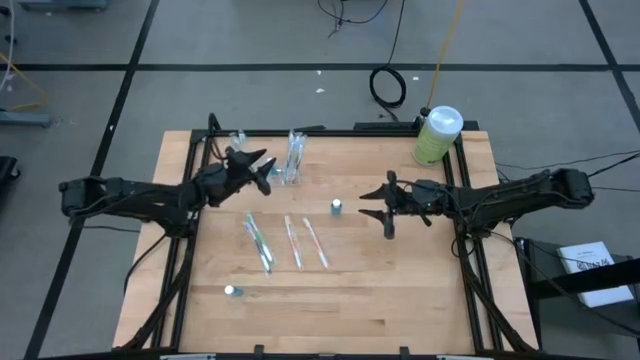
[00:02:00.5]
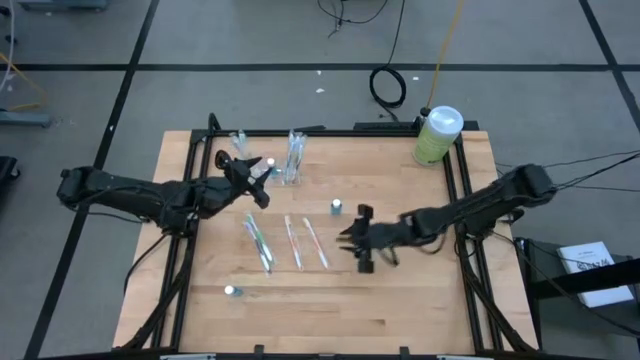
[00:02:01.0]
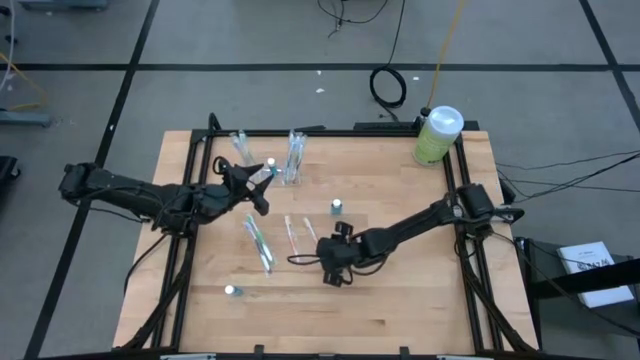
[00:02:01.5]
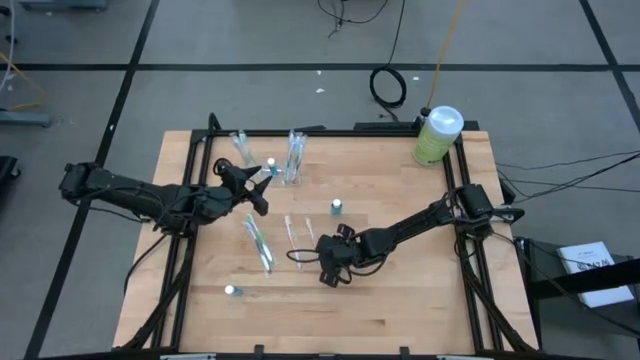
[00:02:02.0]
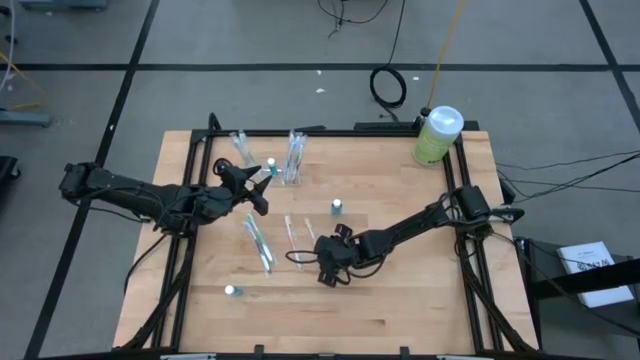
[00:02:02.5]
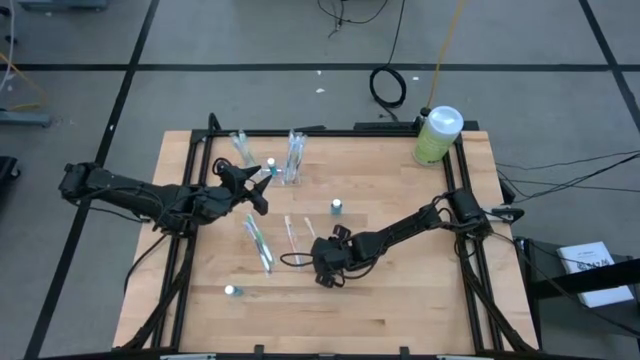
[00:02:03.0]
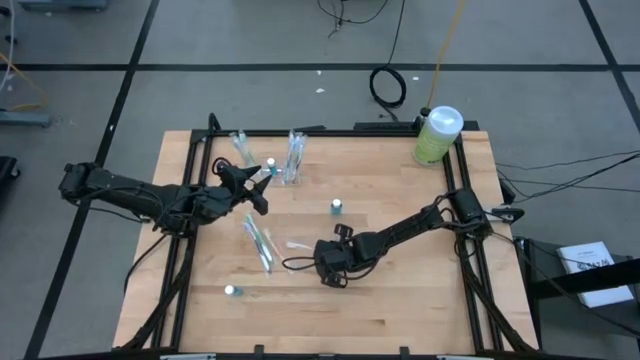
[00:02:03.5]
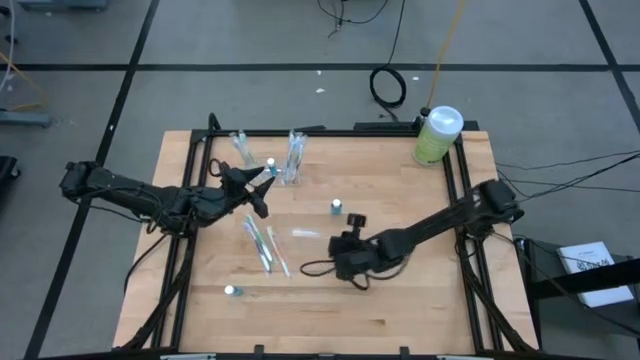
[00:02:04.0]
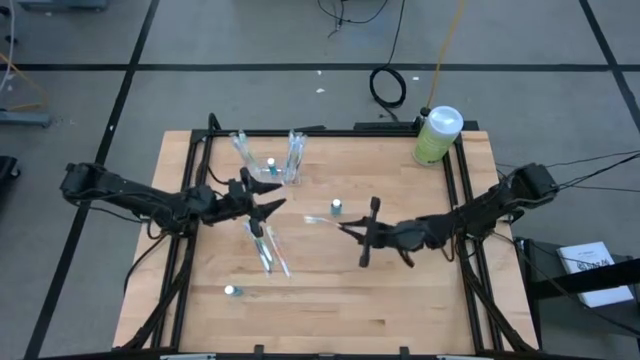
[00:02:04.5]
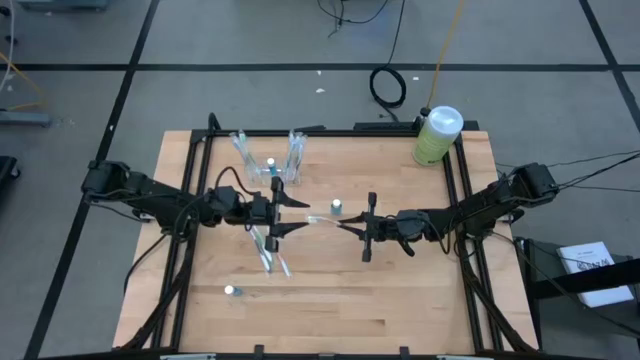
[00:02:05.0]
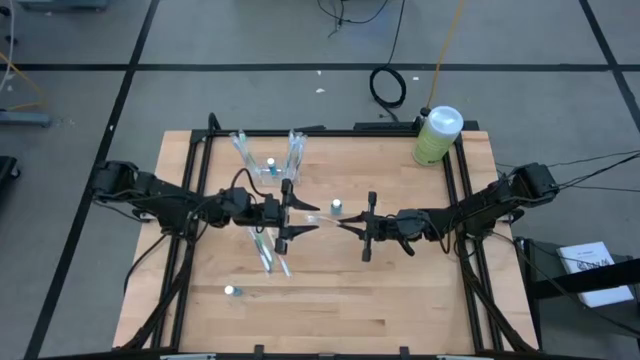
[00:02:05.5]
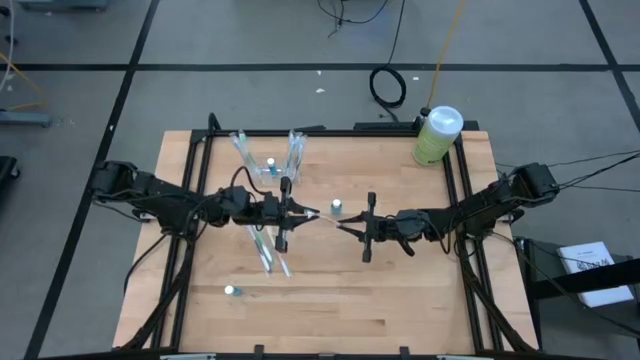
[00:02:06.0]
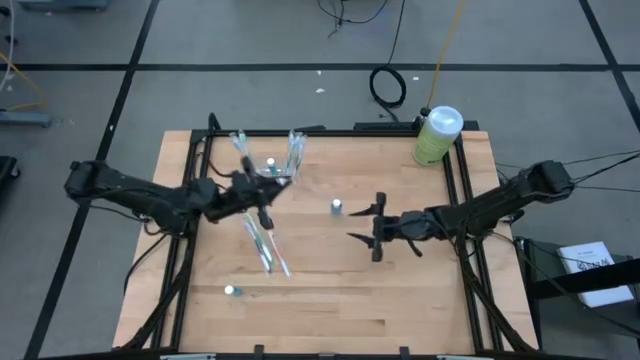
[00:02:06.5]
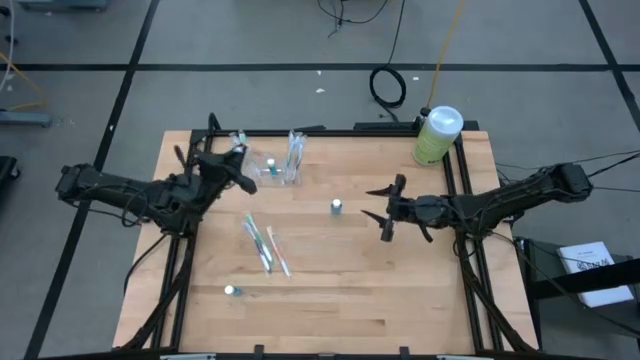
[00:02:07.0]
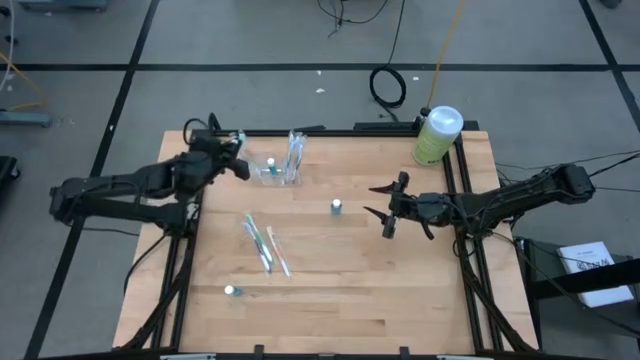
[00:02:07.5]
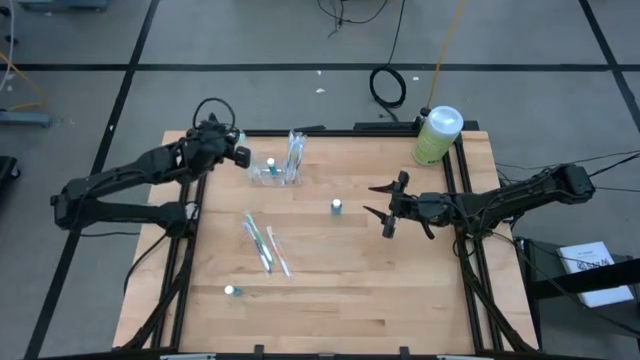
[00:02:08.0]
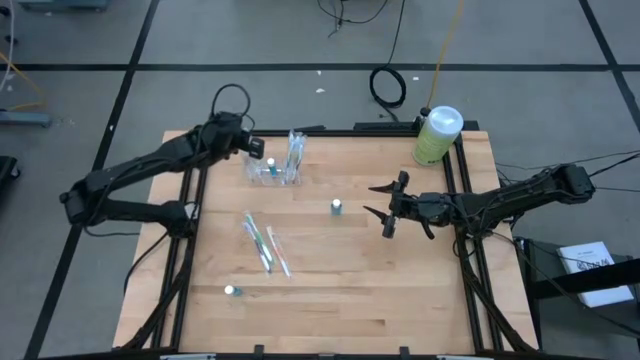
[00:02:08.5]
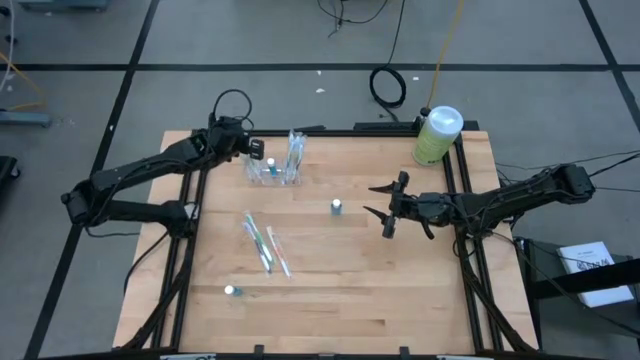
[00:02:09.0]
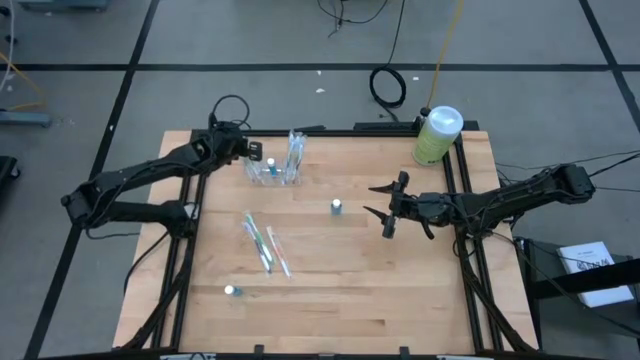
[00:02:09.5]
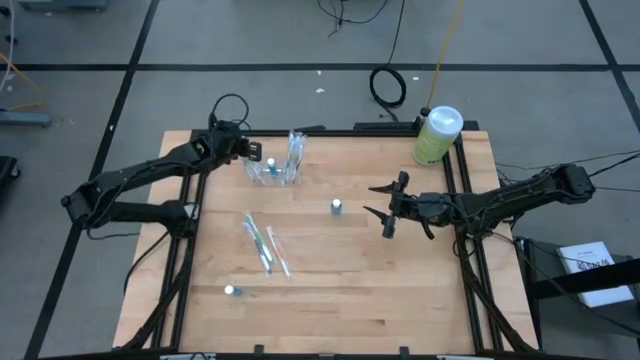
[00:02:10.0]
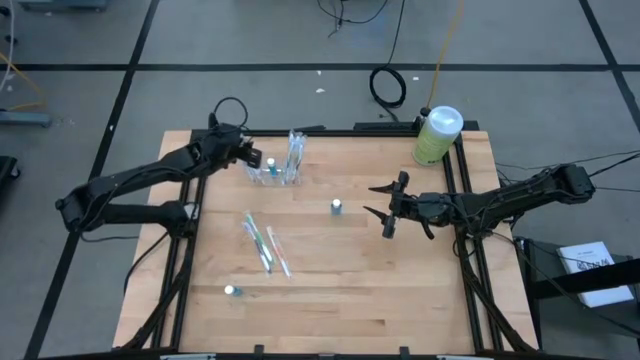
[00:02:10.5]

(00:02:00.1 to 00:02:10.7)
Task: Pick & Place toothbrushing station
Put the orange toothbrush into the transparent organizer

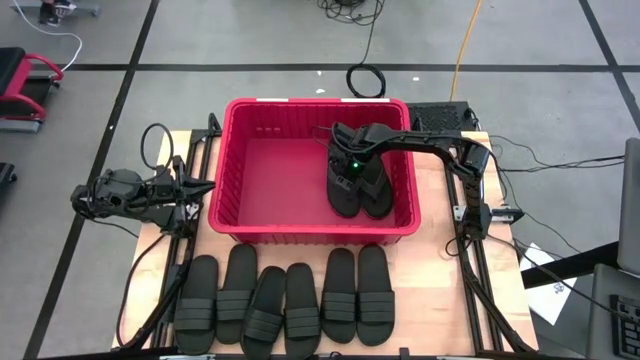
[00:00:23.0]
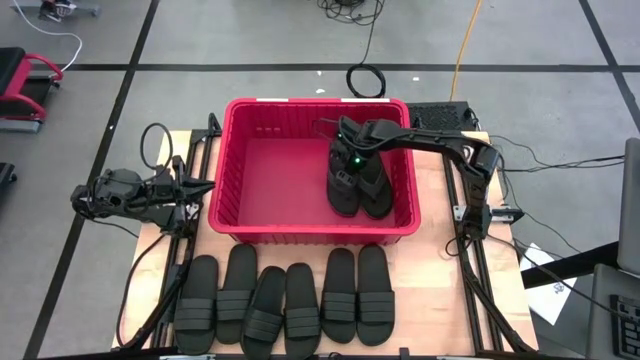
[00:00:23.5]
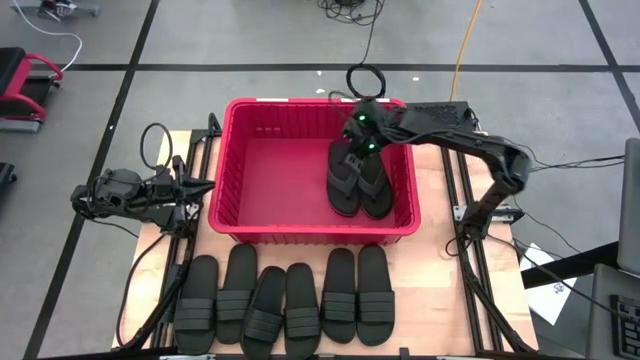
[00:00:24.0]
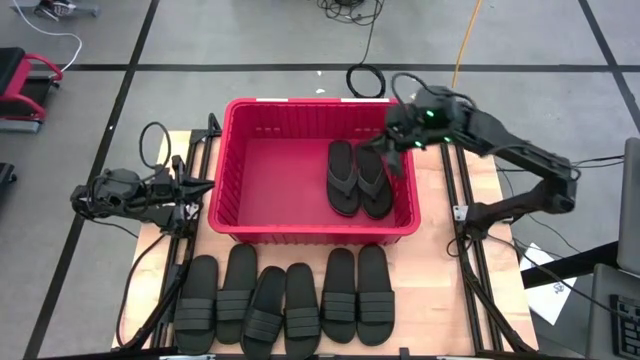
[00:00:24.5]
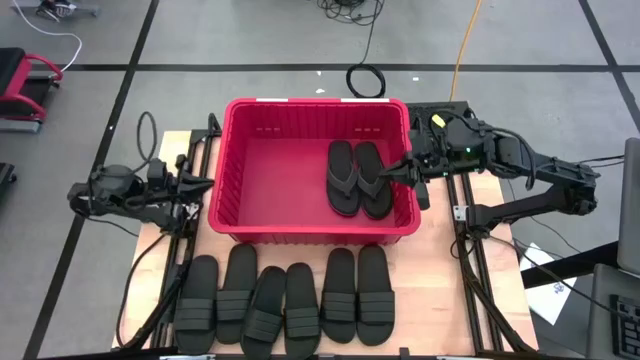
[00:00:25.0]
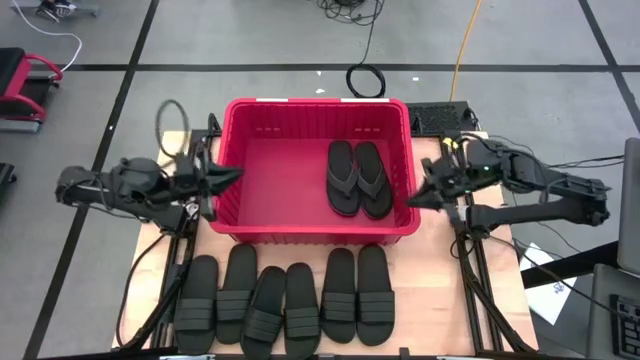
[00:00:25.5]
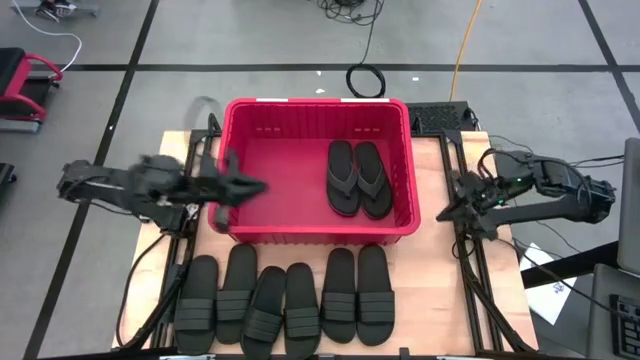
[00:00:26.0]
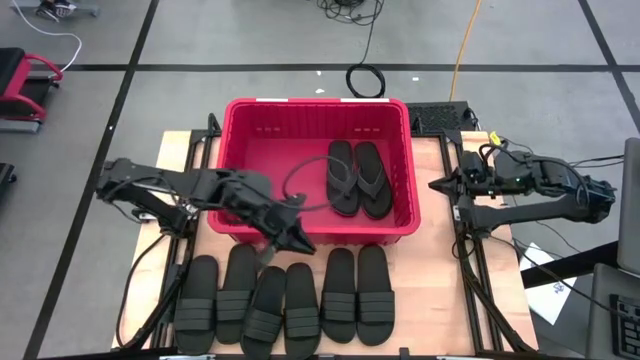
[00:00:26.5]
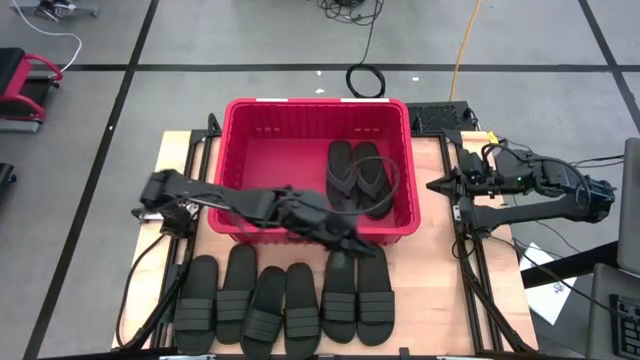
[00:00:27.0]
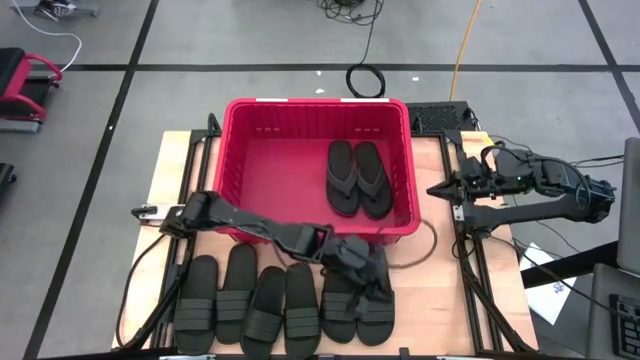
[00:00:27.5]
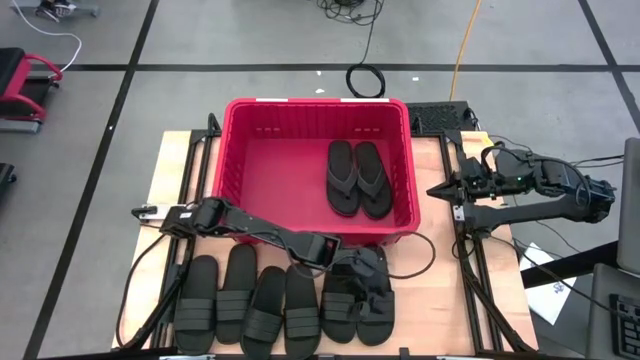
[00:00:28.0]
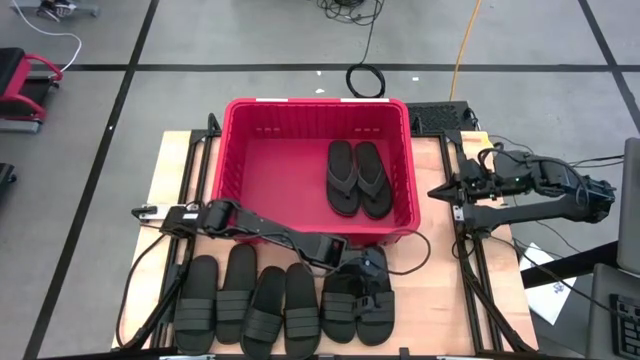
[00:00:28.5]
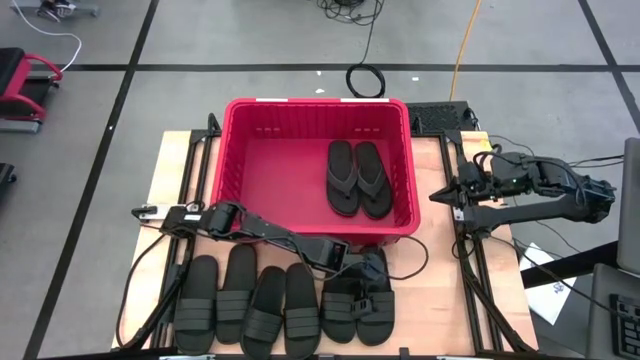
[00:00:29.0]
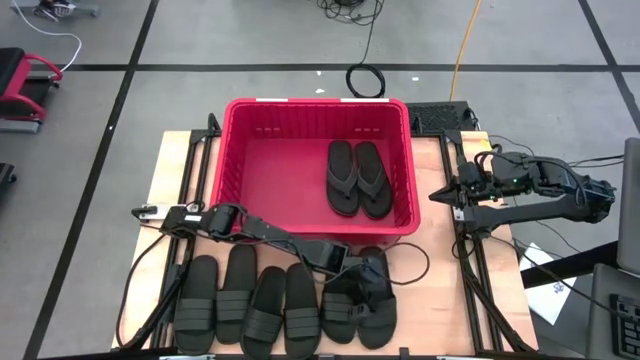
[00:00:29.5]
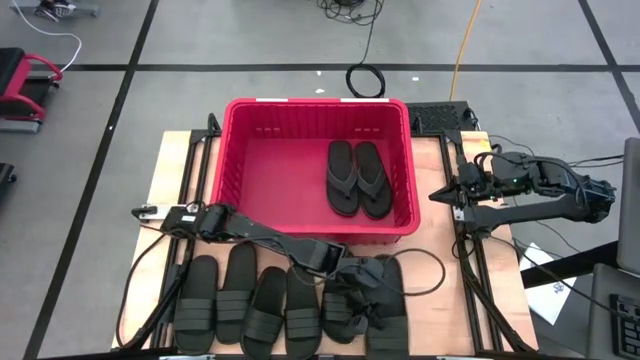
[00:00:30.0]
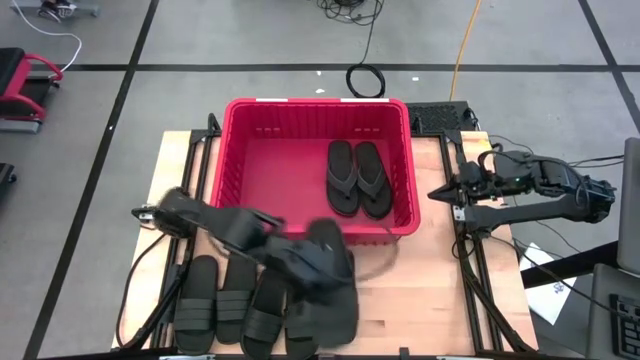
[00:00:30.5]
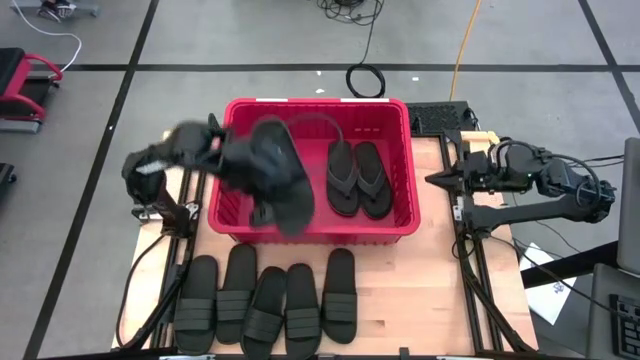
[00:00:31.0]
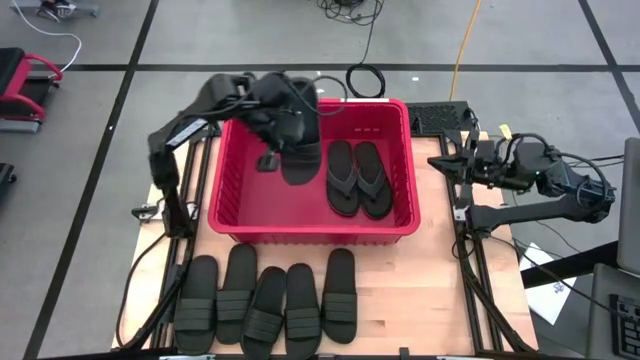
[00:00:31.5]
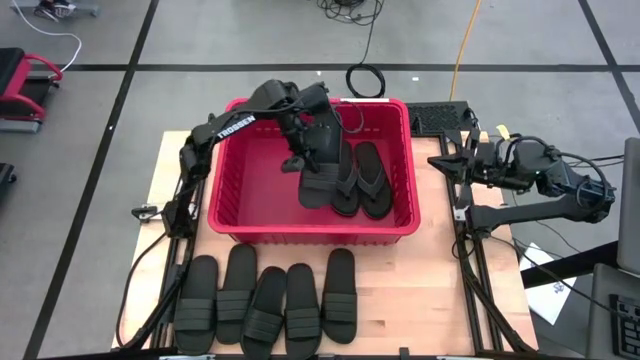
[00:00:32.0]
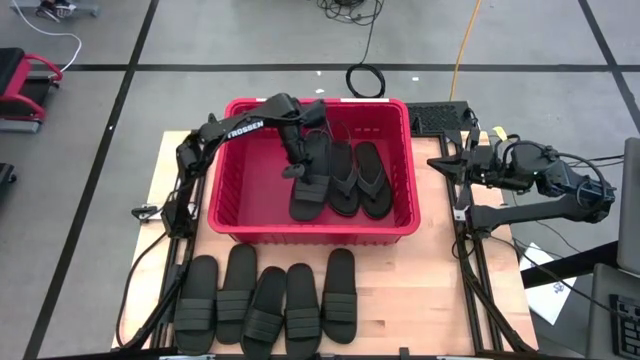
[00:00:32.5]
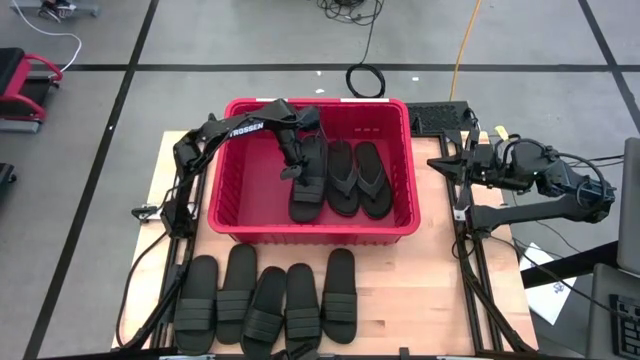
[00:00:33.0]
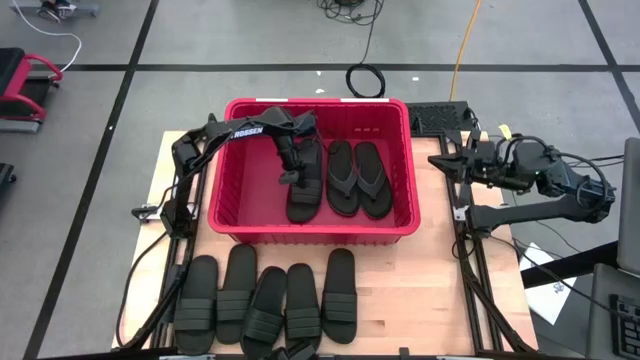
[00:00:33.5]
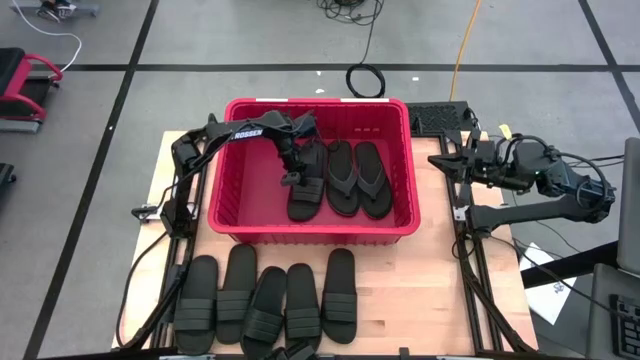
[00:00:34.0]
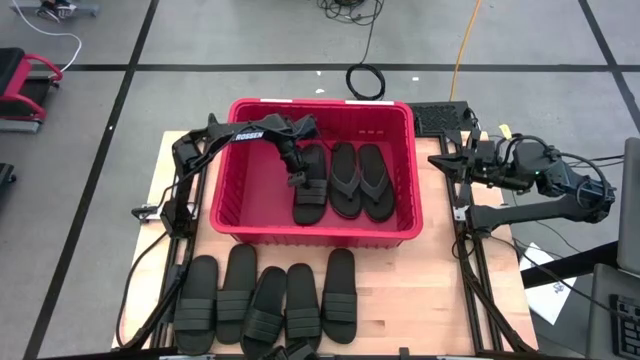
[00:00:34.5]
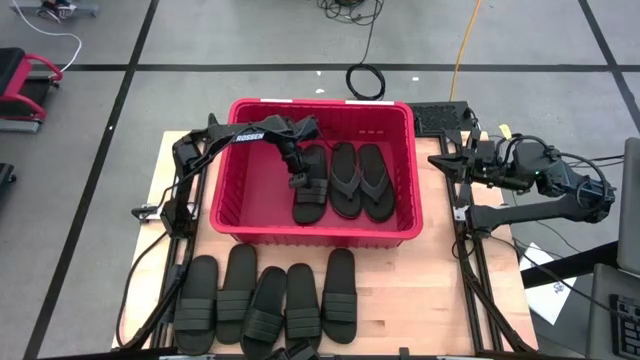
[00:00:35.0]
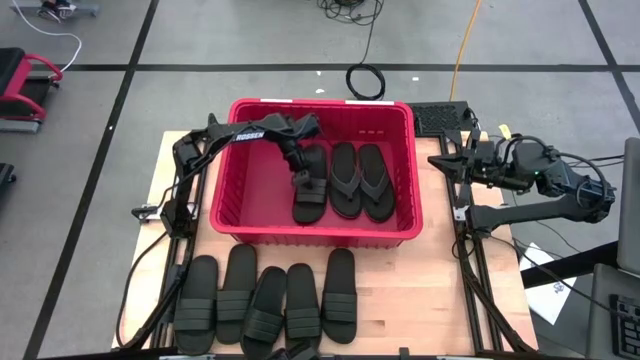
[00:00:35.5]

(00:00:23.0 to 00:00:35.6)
Task: Pick and place slides into bin
Put the slide into the red bin
